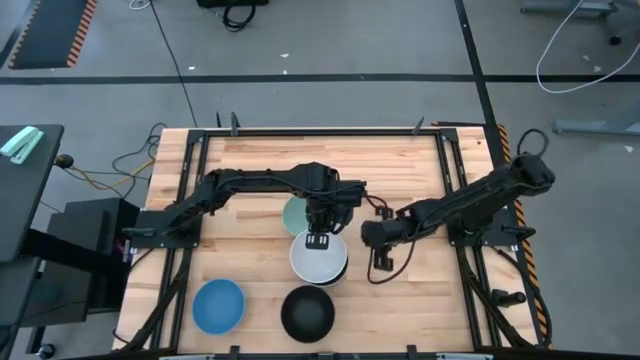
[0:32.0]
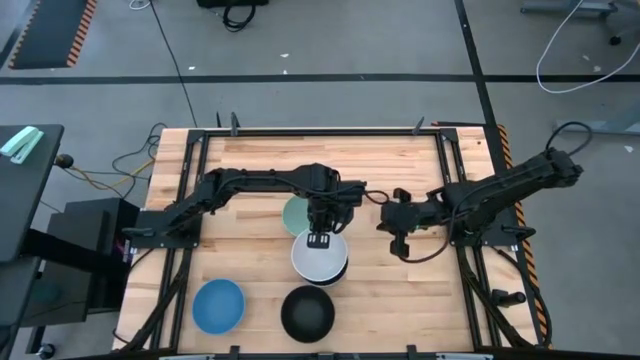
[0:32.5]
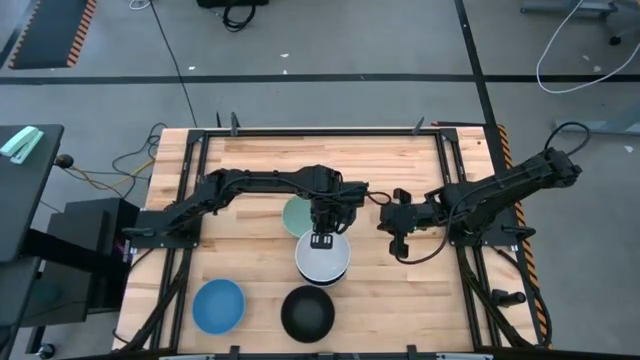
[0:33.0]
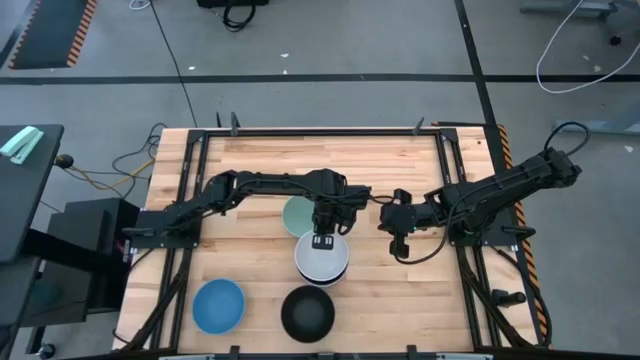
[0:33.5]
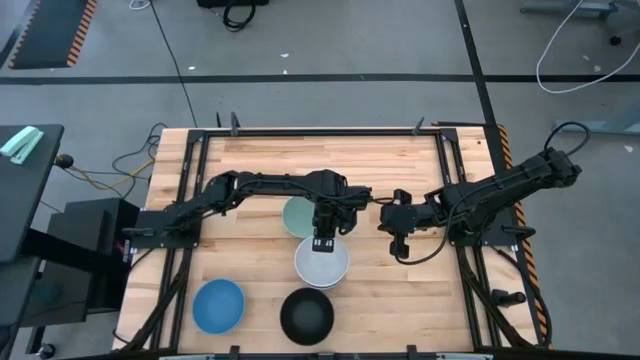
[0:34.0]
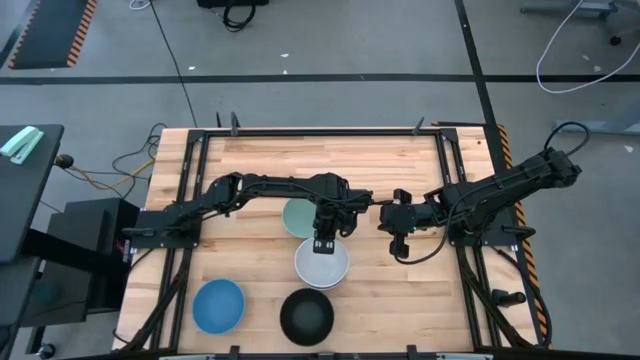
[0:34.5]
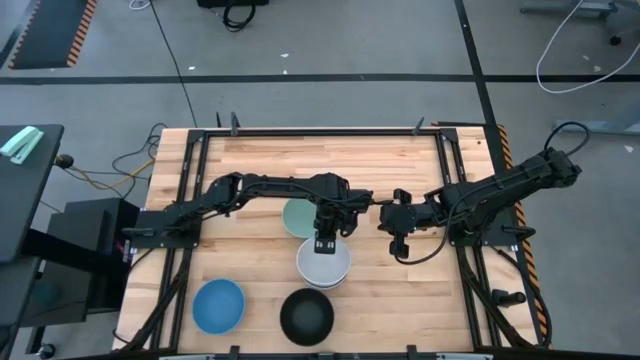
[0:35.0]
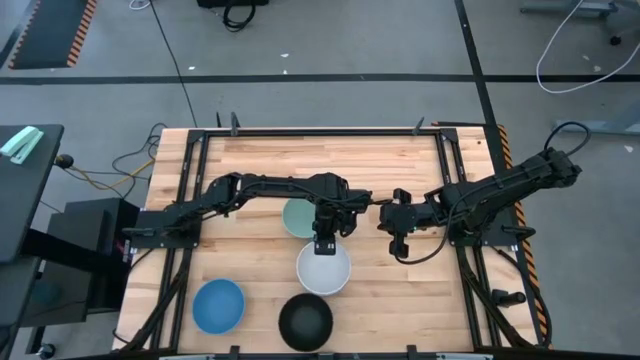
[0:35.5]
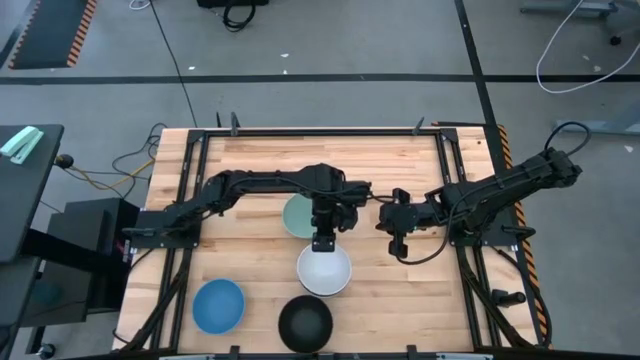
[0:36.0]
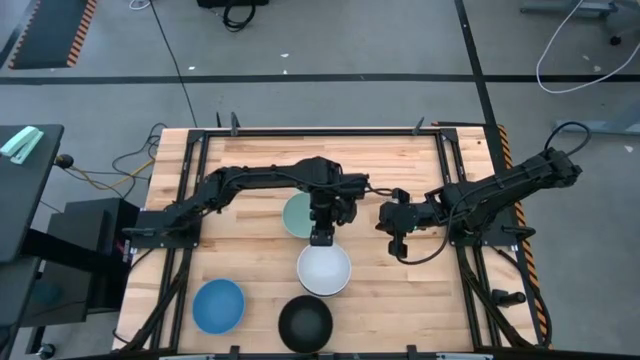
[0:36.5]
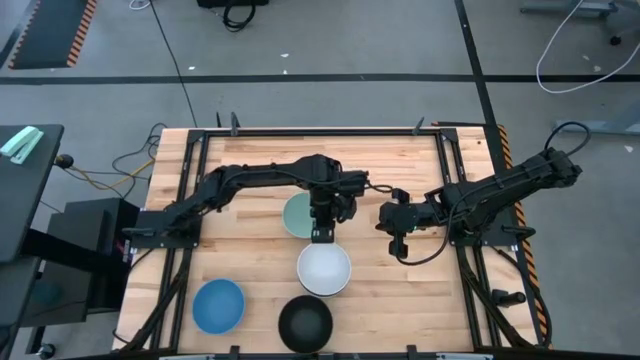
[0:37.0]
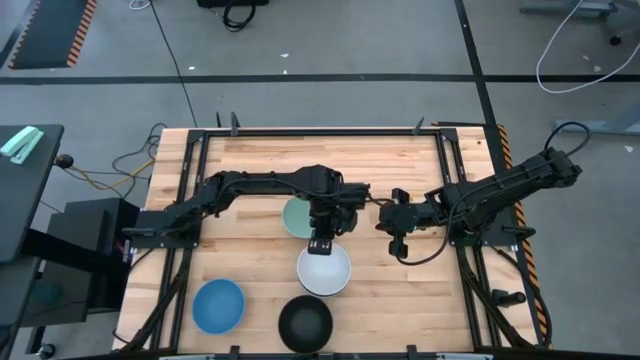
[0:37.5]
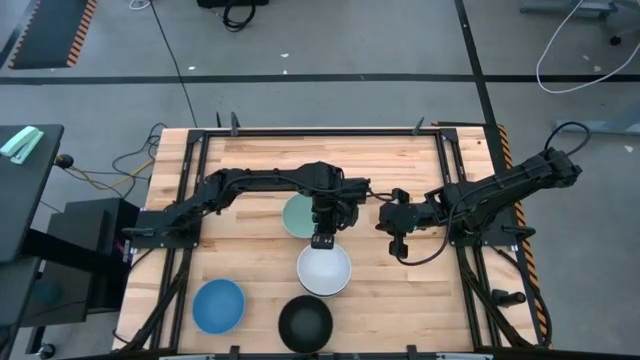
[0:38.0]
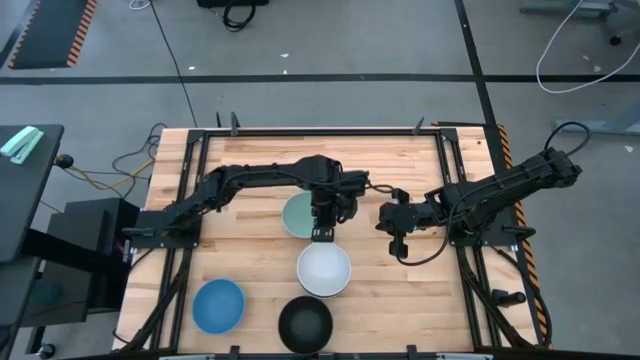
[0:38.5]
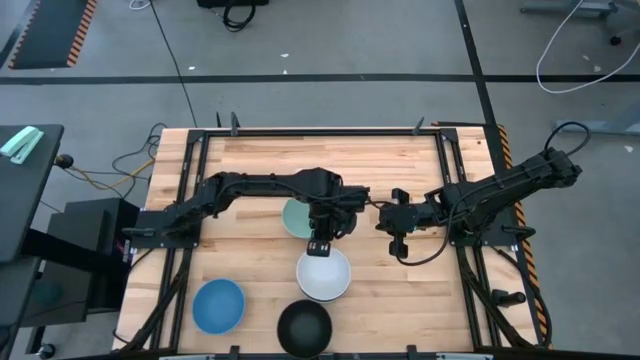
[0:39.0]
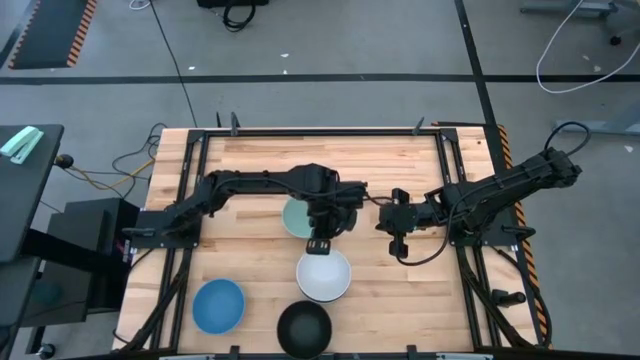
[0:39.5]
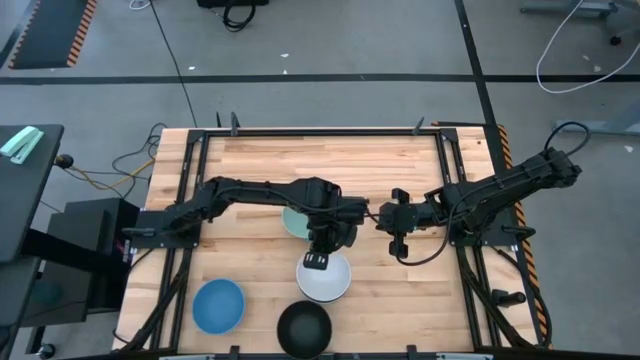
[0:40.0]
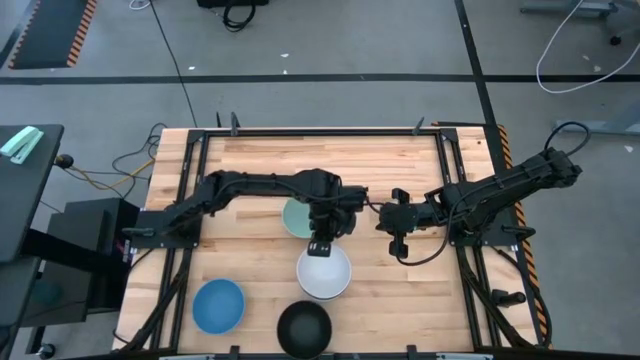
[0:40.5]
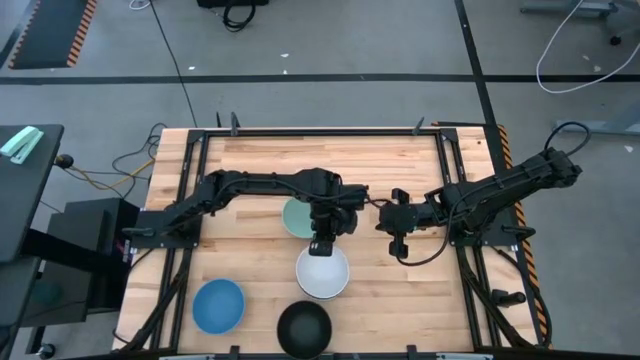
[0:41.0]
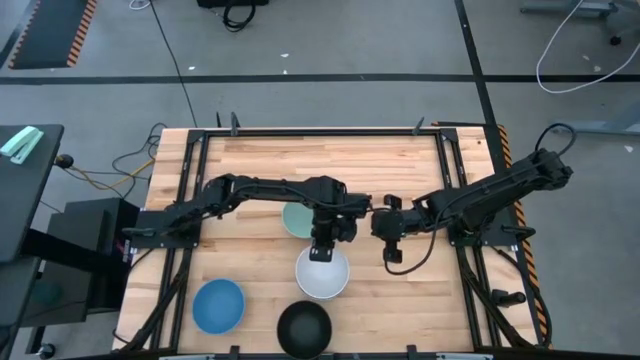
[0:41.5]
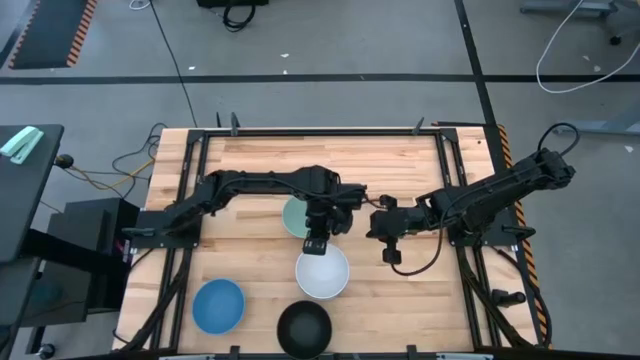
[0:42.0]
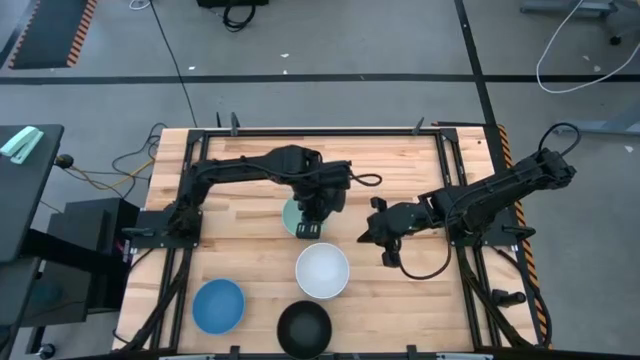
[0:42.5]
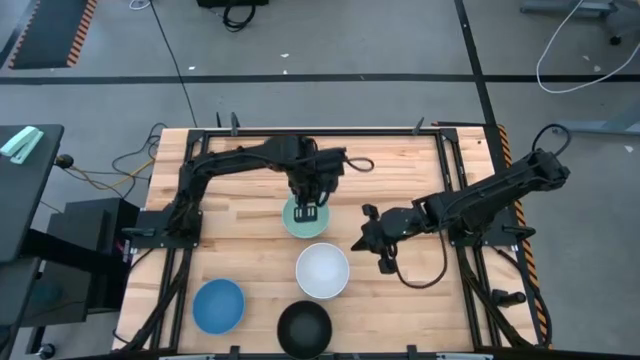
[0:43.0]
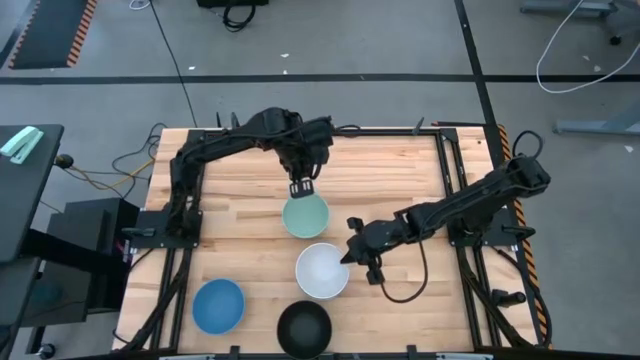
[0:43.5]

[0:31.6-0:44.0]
Task: Nest bowls inside each other
Stack the white bowl on top of the top black bowl

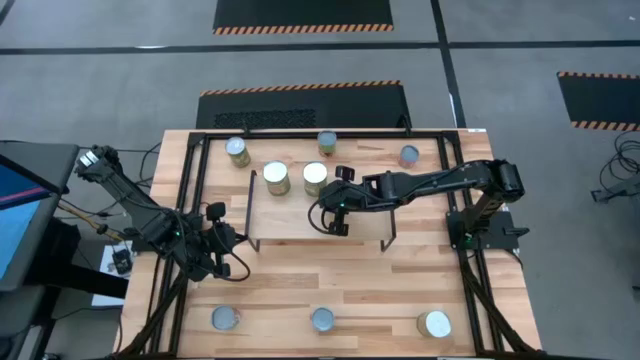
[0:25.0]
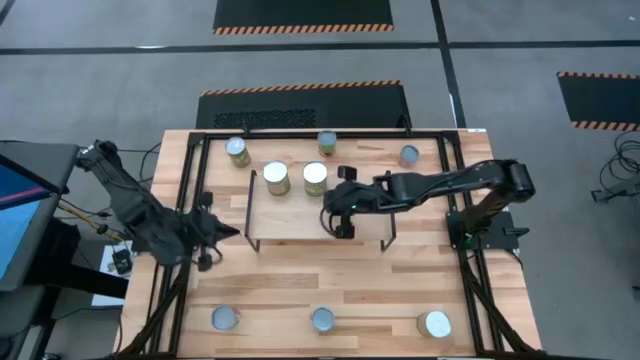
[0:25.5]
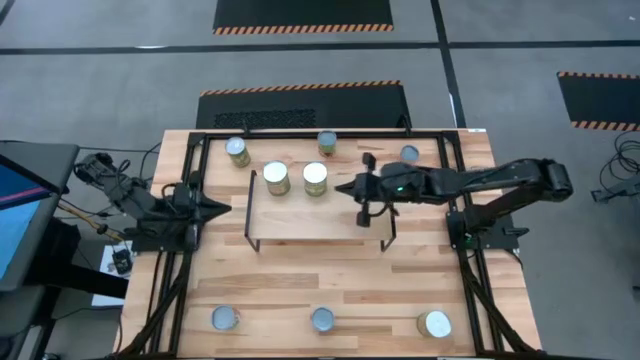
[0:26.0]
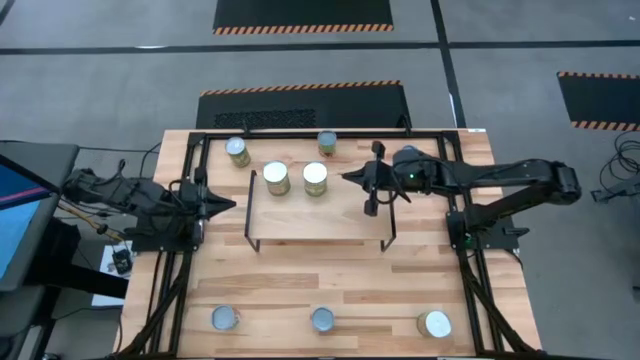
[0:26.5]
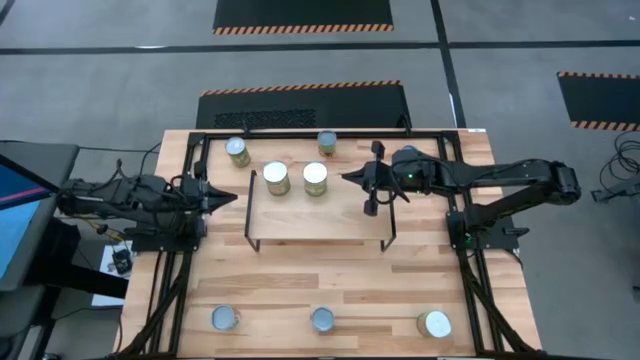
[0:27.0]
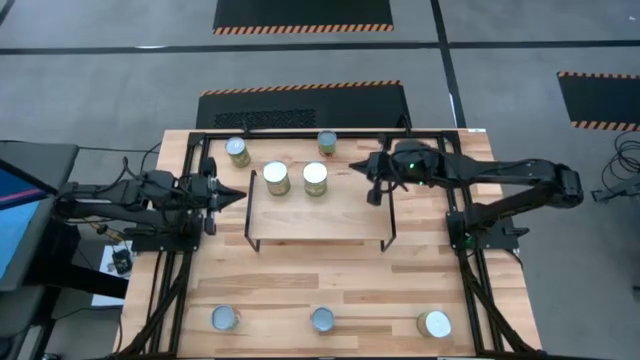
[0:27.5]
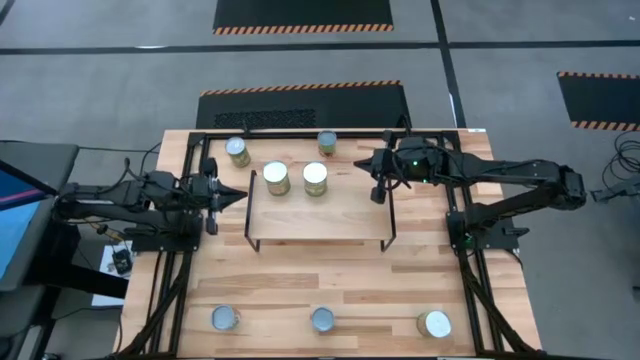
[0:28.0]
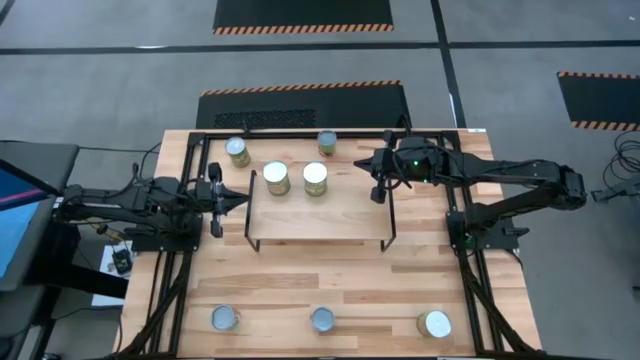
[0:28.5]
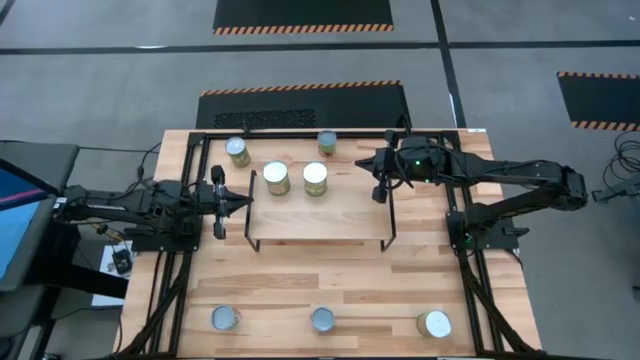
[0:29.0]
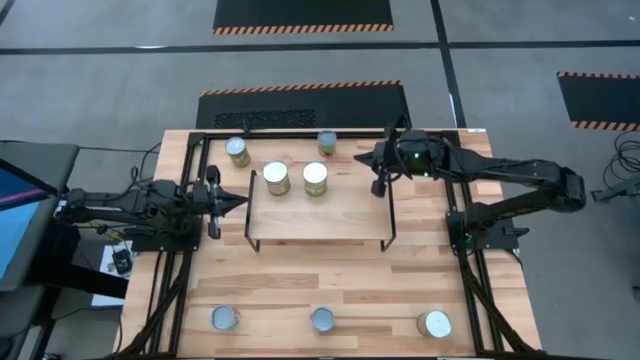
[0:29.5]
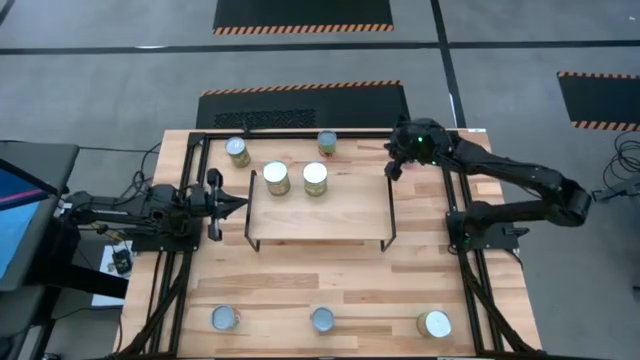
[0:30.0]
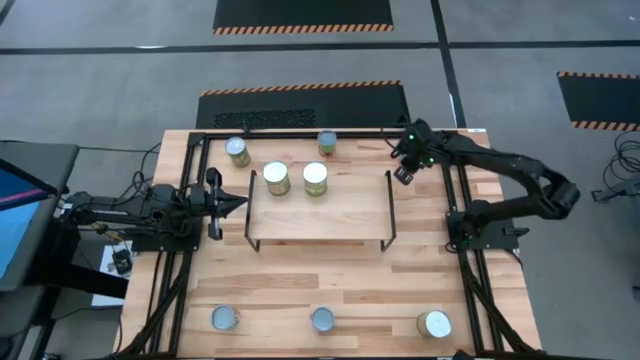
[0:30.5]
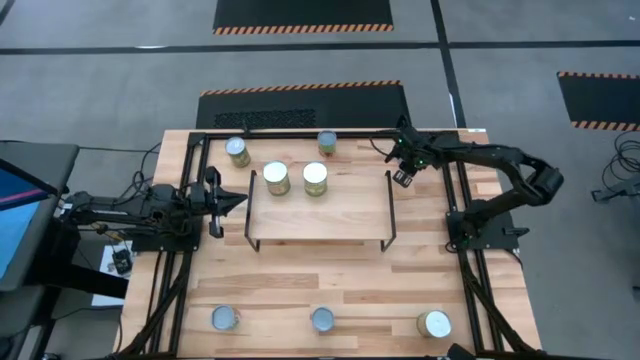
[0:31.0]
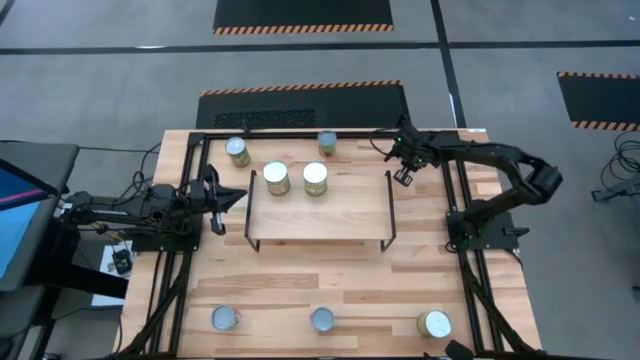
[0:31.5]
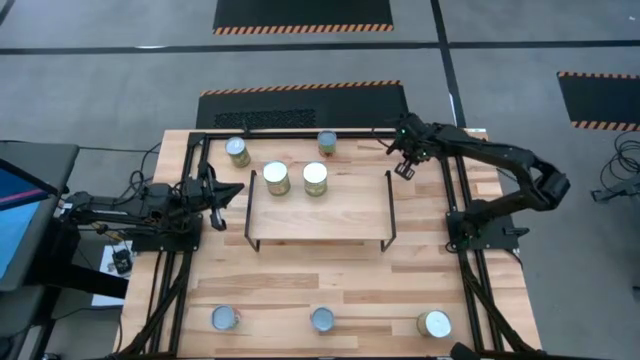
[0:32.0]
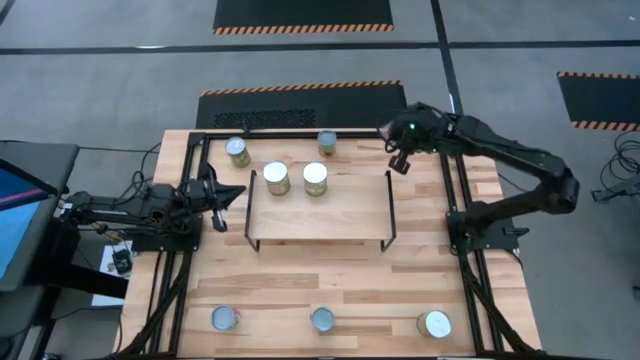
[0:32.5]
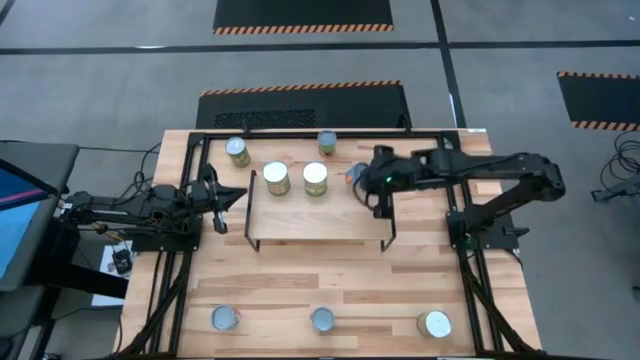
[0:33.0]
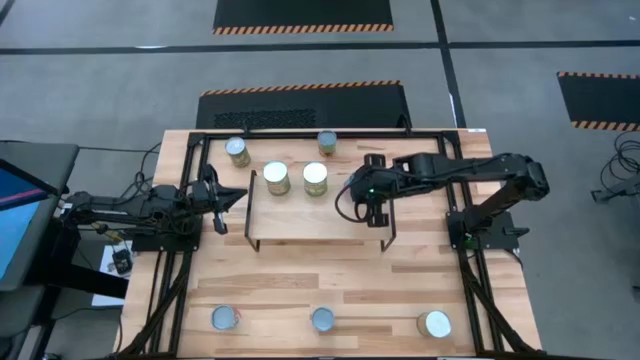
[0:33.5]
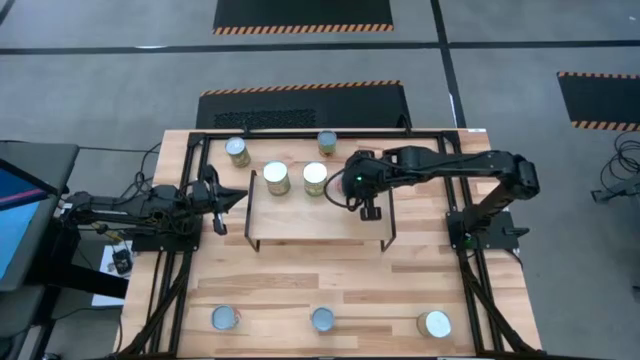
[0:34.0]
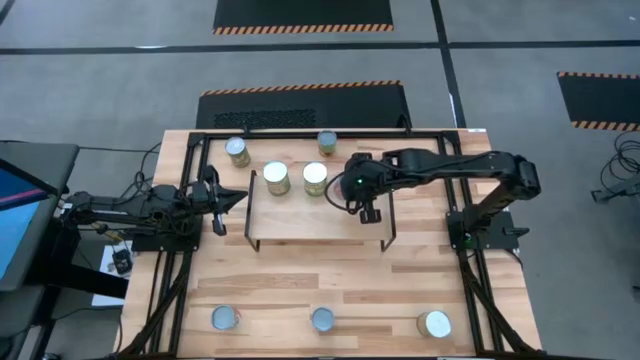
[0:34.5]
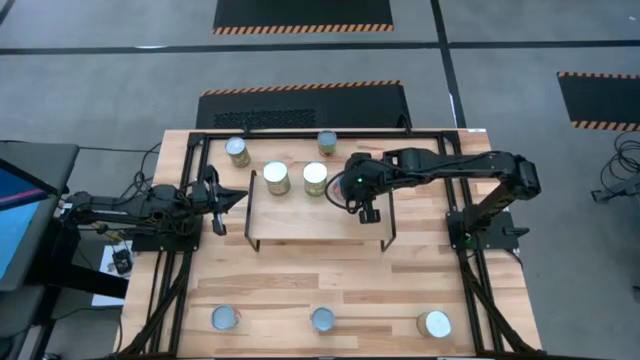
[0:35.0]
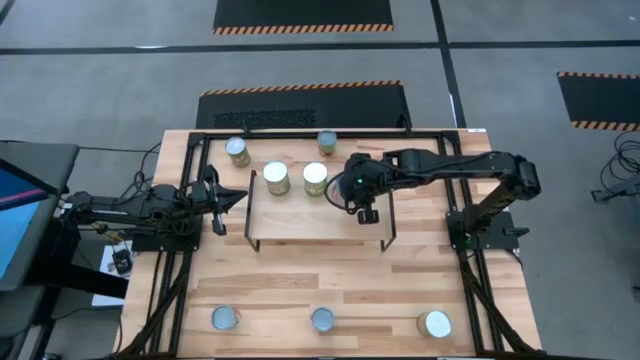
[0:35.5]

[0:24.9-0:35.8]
Task: Pick and place cans onto a shelf
Put the top canned corn on the shelf
